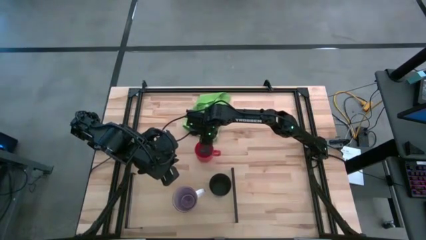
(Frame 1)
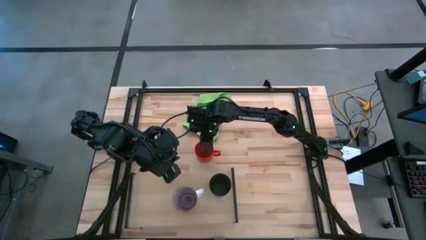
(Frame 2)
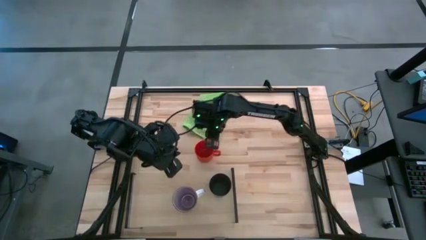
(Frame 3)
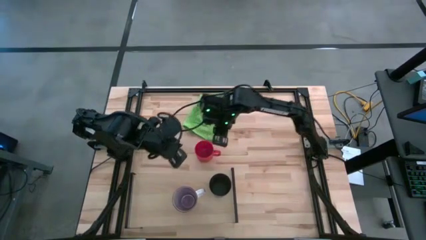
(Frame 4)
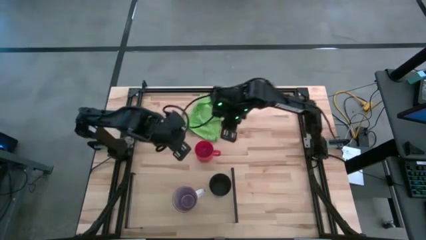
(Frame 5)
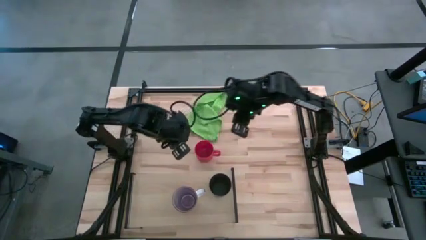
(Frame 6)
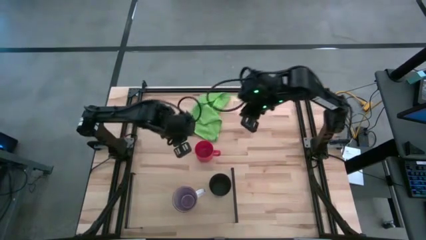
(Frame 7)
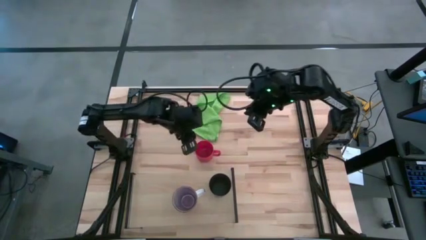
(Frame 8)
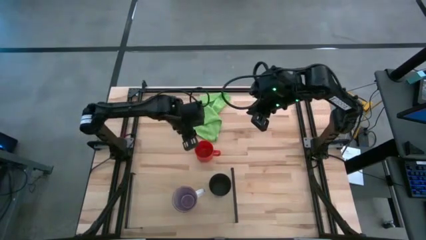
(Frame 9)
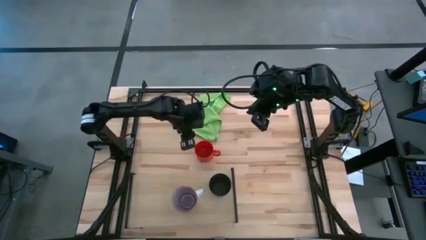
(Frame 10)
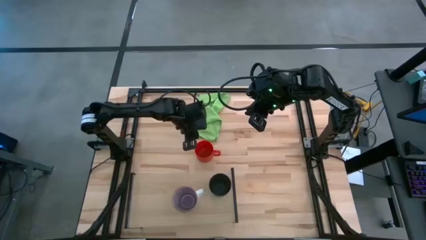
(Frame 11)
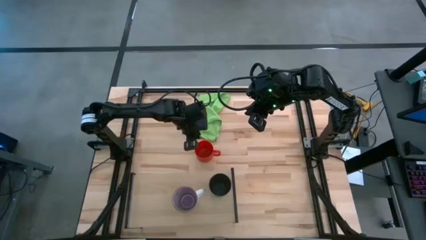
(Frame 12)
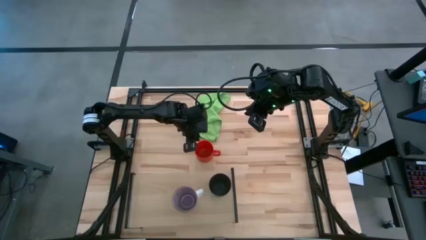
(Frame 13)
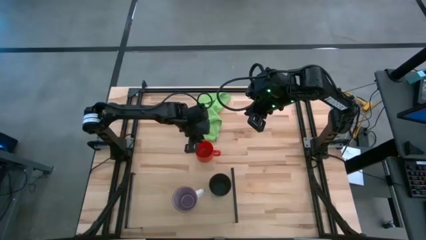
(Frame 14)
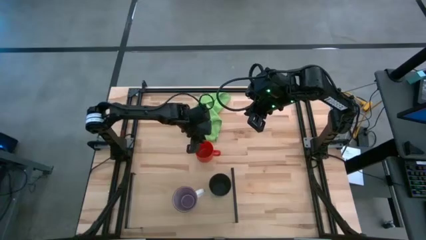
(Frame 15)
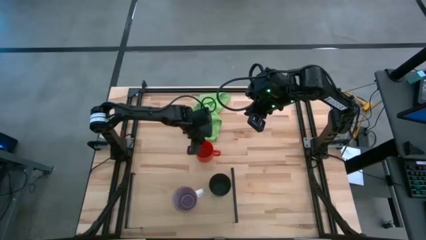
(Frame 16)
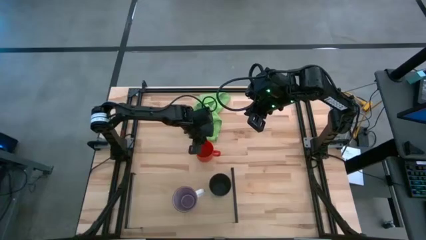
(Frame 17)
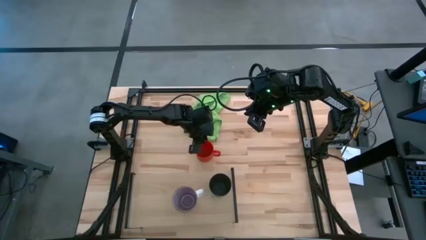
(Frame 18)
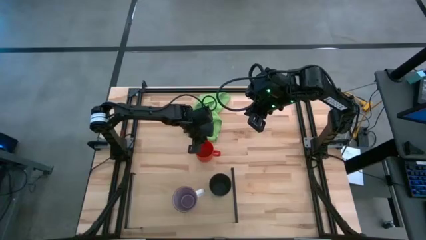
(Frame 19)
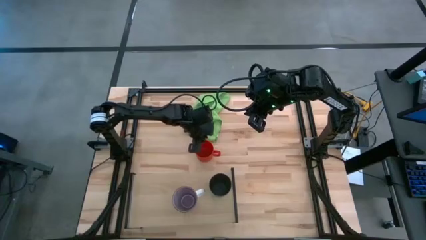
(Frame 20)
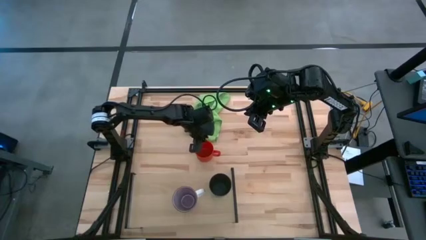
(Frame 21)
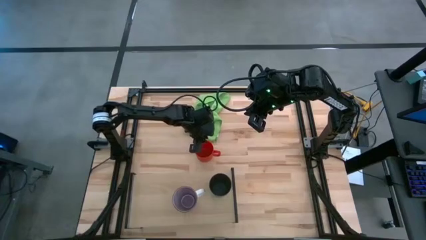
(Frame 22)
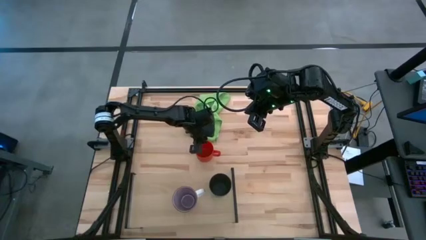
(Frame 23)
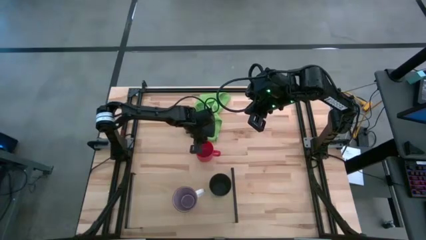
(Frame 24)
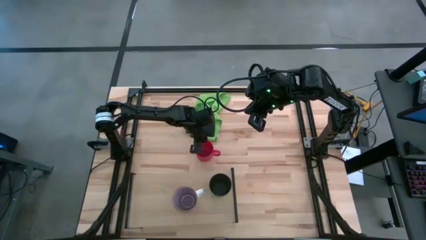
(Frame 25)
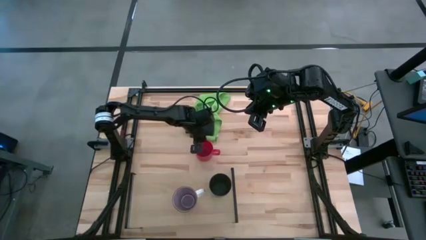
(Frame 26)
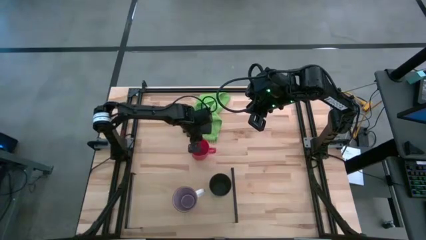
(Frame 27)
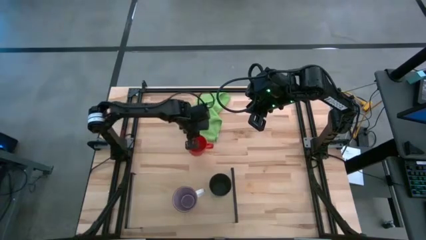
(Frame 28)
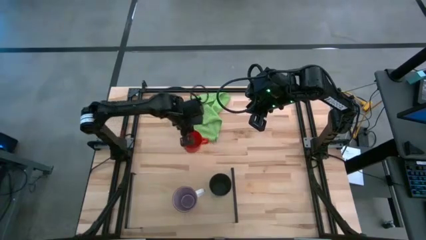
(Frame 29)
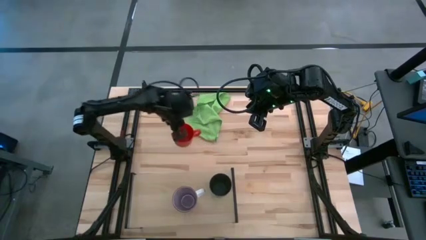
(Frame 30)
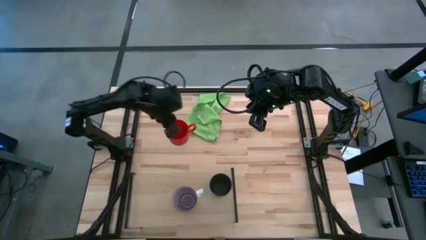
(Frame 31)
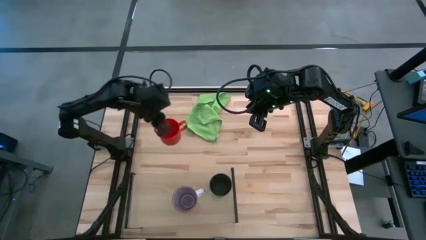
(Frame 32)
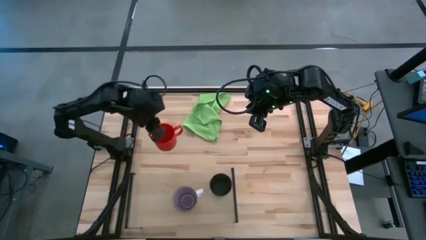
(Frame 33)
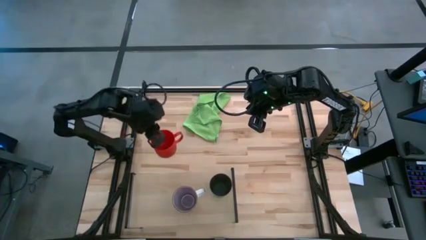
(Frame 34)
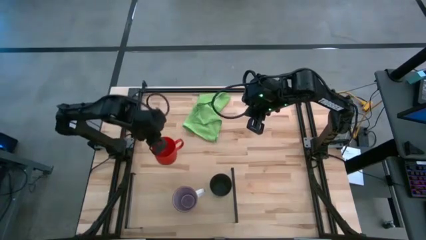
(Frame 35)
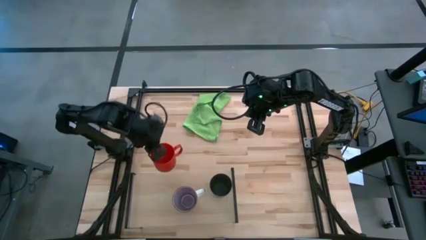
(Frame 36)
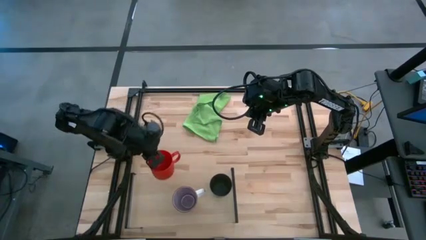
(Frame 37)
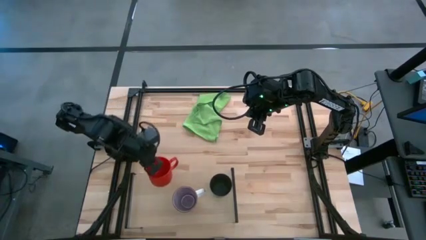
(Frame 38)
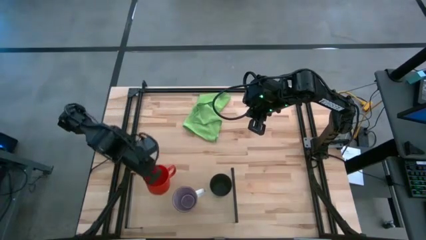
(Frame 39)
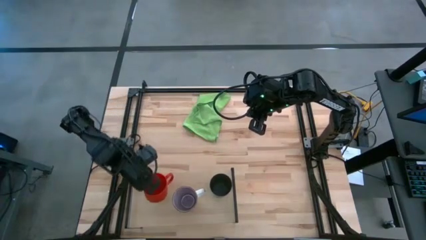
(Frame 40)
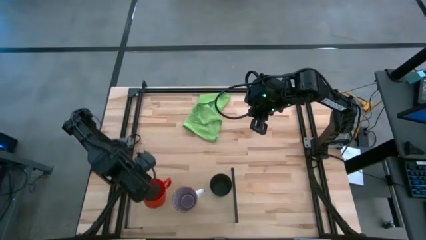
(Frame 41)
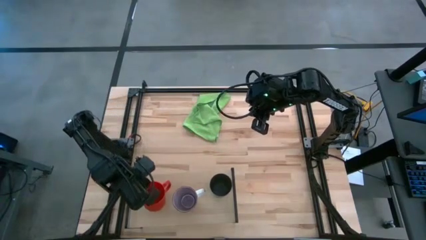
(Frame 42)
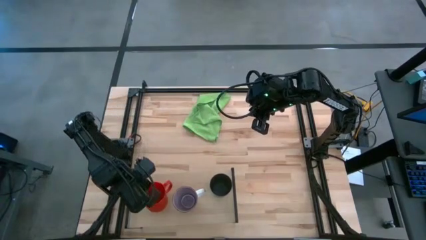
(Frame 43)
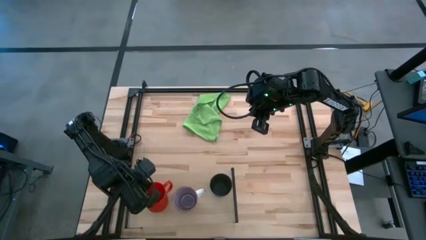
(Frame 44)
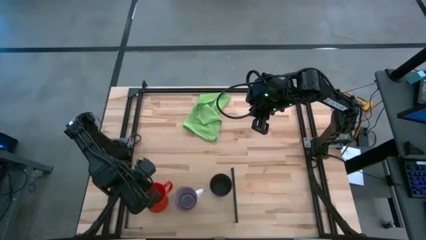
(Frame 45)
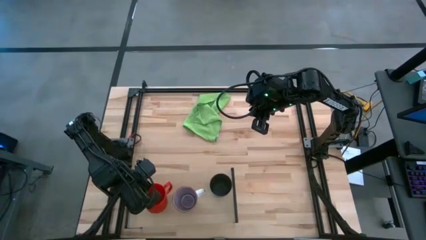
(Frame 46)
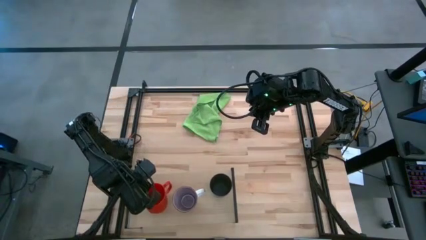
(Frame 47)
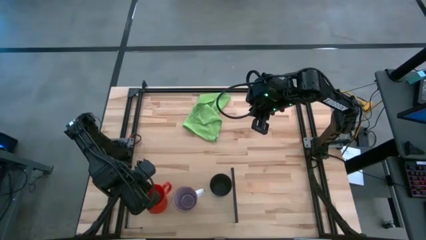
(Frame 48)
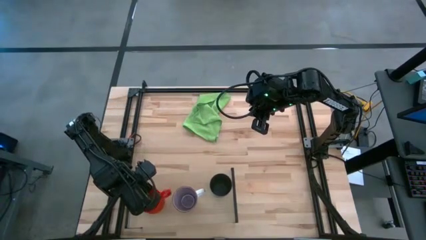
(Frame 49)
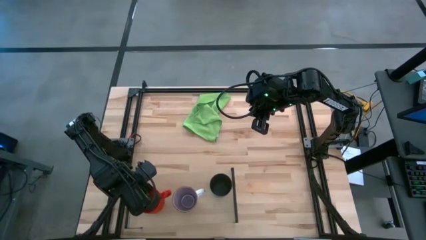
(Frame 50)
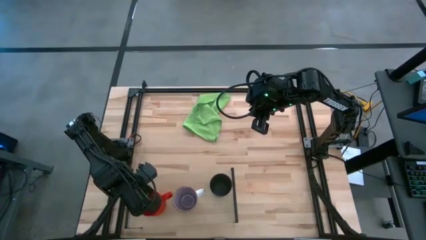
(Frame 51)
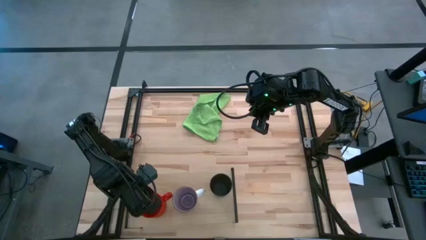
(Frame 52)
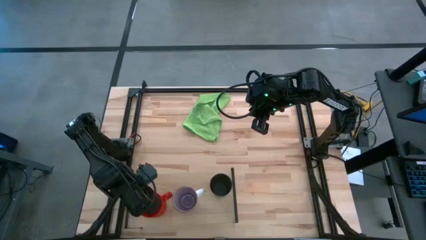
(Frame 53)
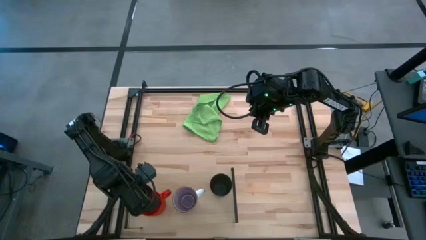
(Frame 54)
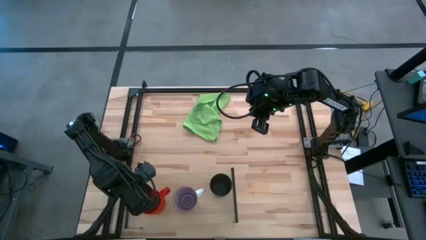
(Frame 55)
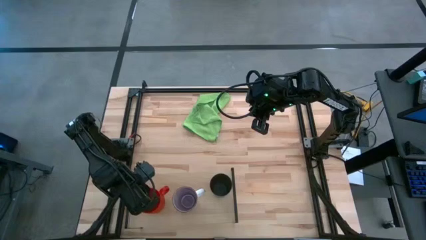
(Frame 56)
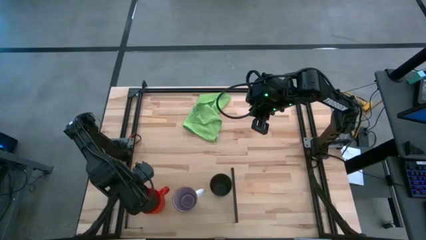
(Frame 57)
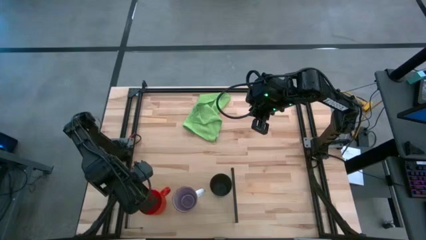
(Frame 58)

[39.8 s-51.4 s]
Task: Stack small to large cups/mugs on shelf
Put the red mug on the shelf

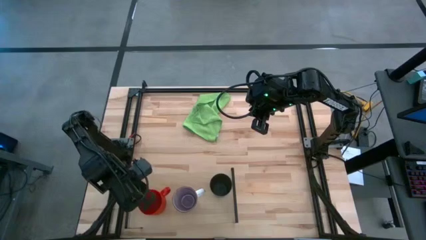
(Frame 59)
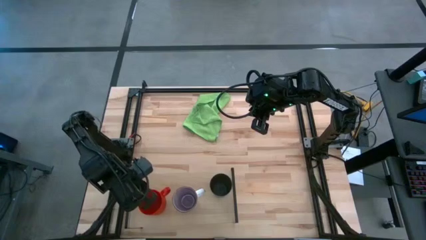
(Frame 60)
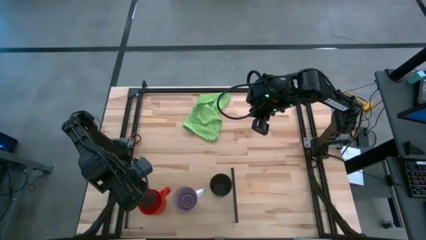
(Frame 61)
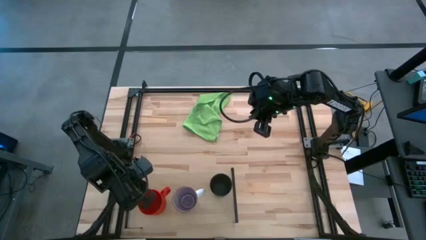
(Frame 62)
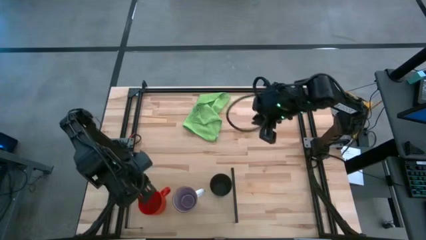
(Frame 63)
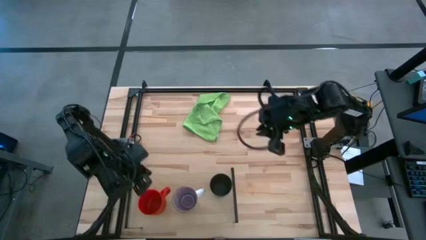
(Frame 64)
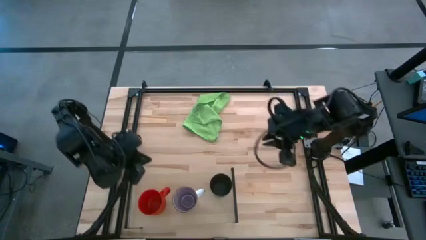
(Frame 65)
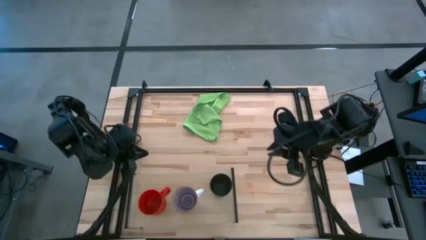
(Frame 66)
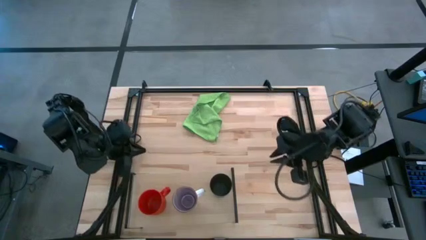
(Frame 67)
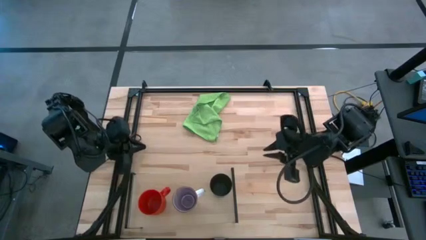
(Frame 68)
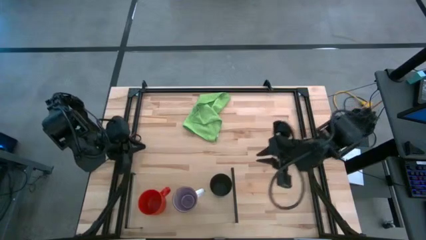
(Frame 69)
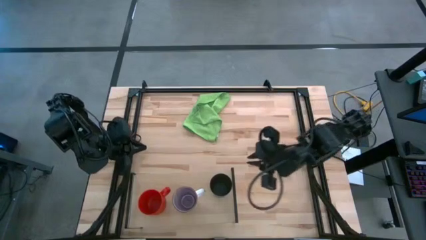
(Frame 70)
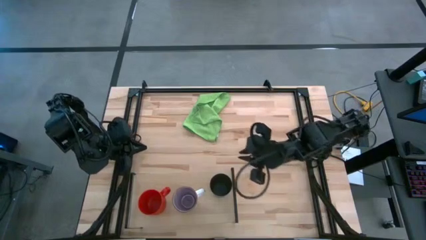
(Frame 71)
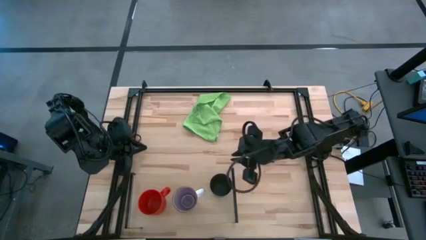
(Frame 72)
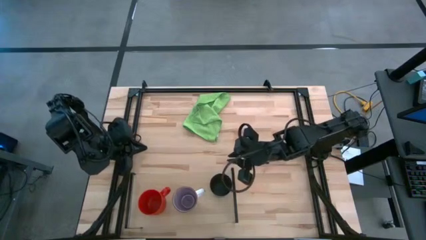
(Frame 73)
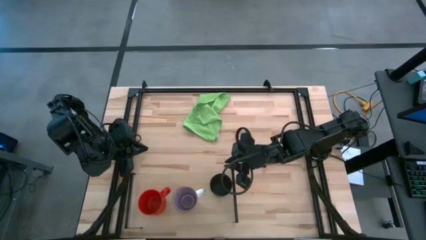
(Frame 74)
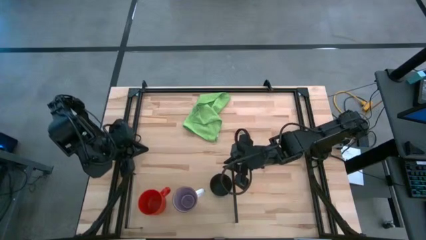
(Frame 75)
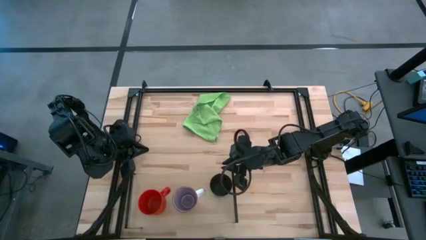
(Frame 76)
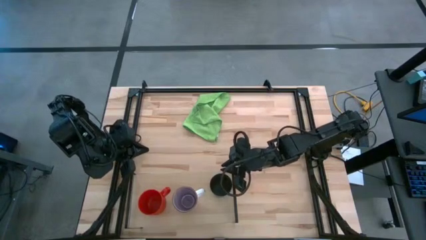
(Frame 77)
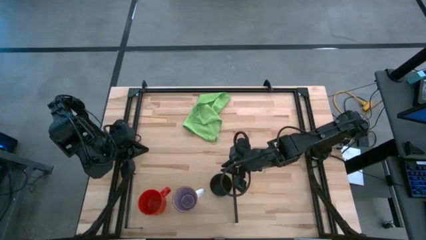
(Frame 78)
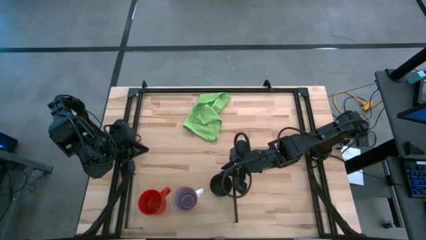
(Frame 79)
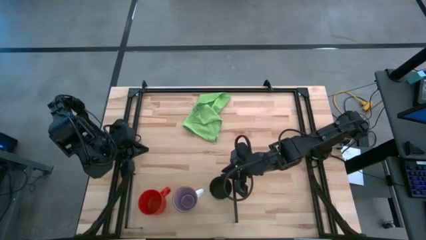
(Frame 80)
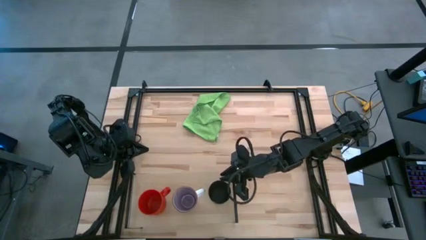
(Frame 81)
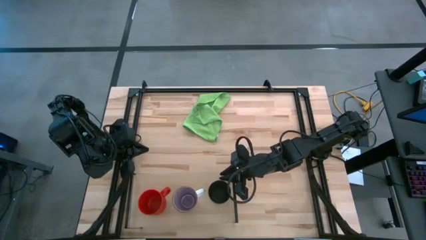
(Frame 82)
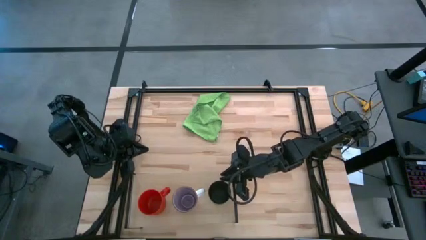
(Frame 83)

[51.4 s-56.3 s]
Adjust the black cup
